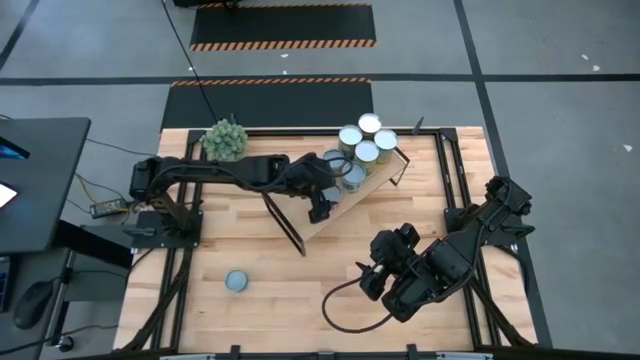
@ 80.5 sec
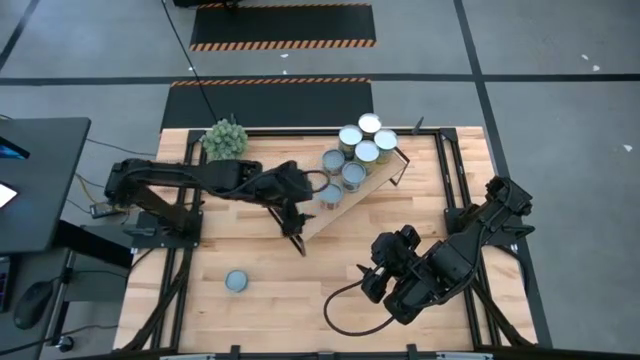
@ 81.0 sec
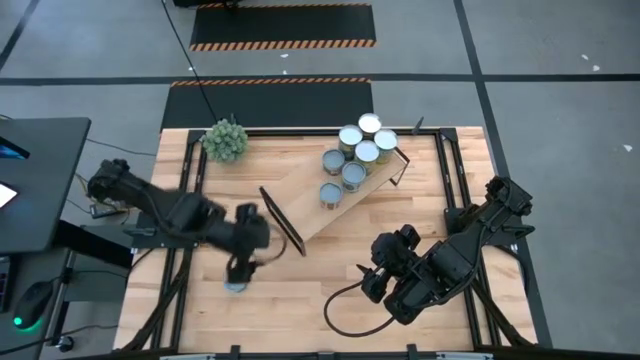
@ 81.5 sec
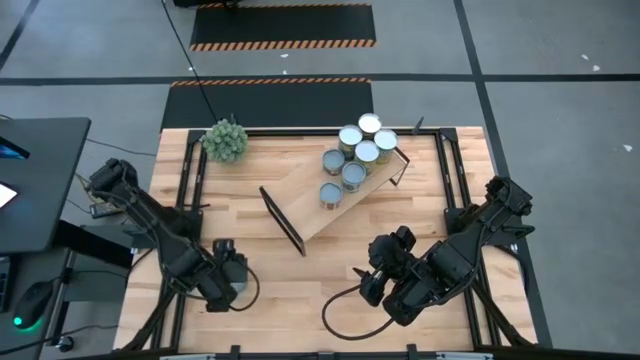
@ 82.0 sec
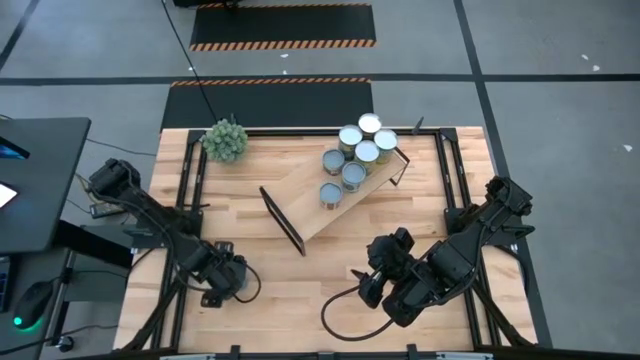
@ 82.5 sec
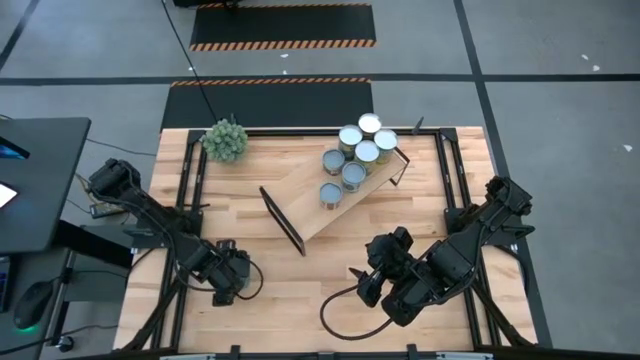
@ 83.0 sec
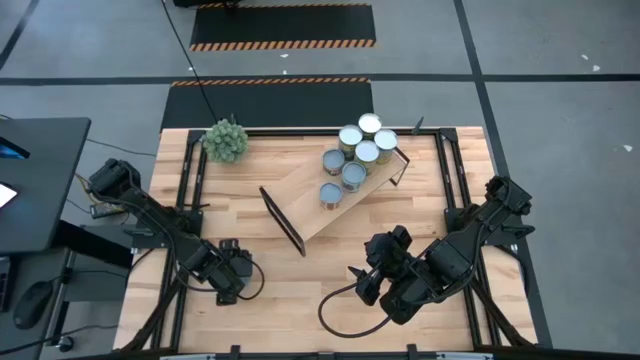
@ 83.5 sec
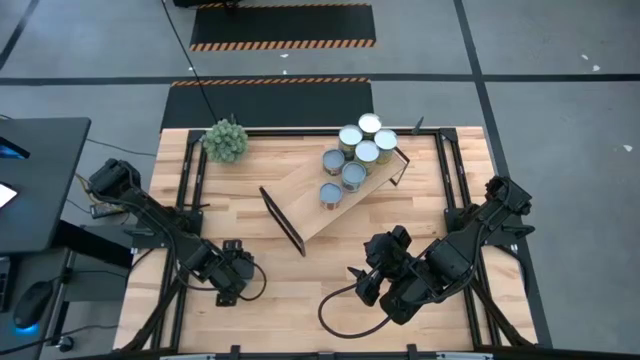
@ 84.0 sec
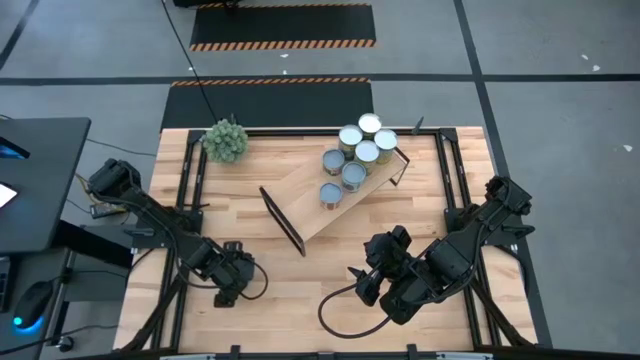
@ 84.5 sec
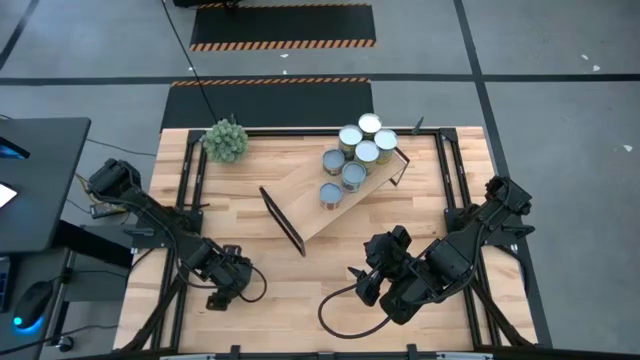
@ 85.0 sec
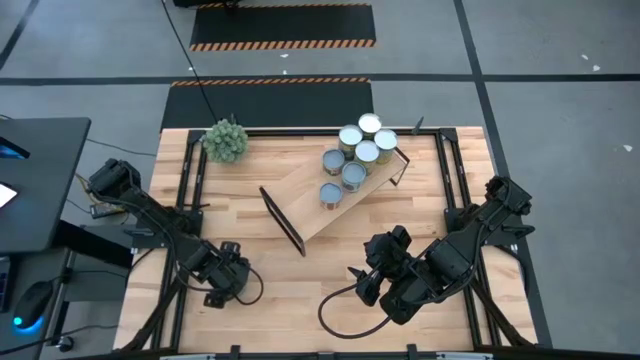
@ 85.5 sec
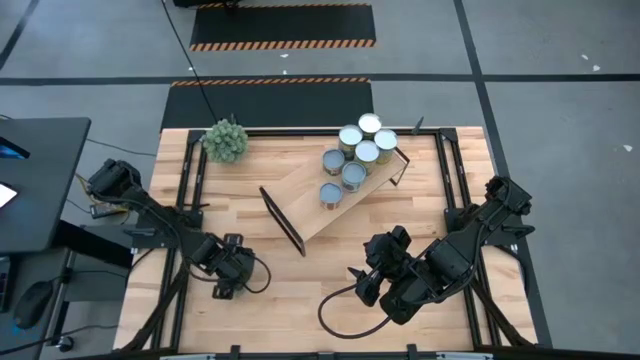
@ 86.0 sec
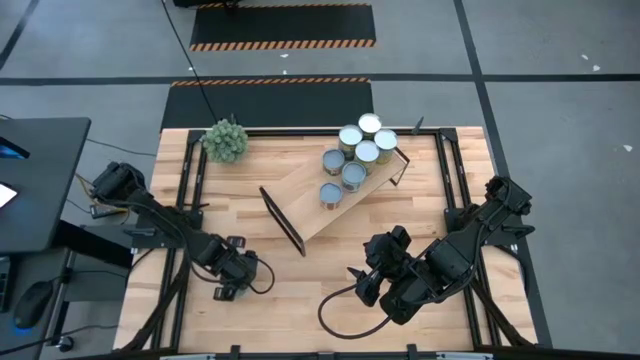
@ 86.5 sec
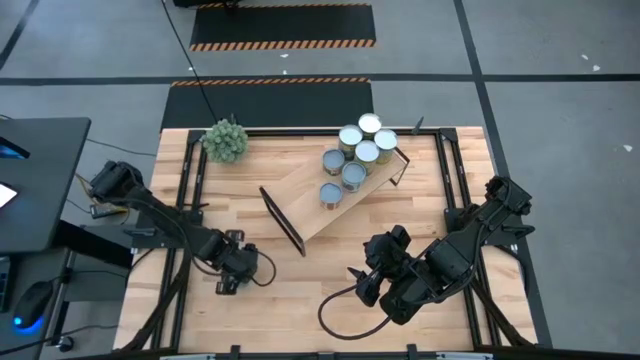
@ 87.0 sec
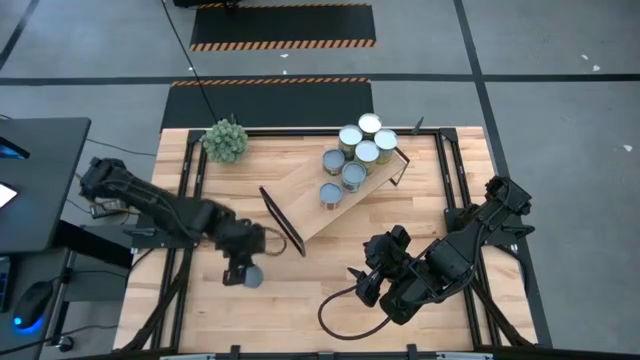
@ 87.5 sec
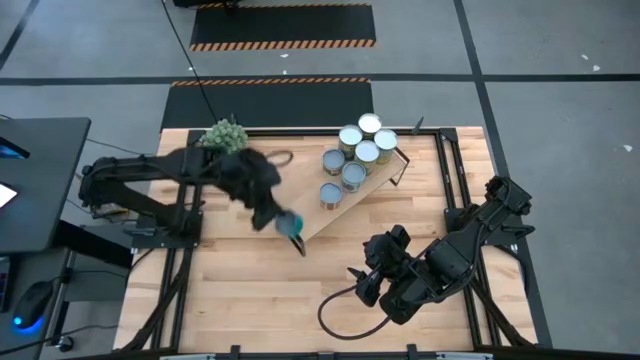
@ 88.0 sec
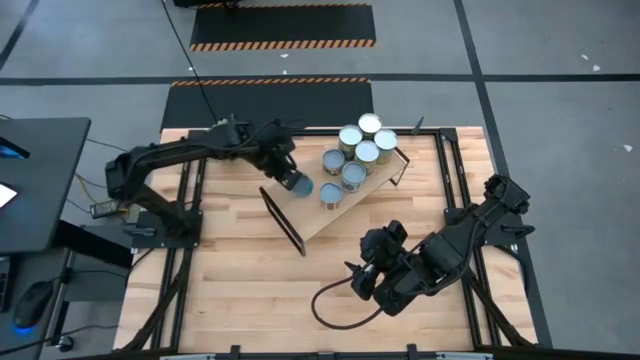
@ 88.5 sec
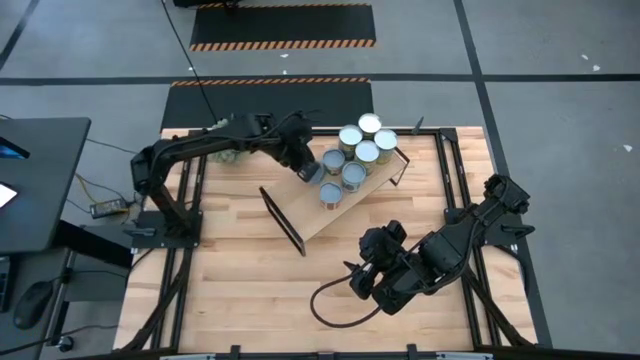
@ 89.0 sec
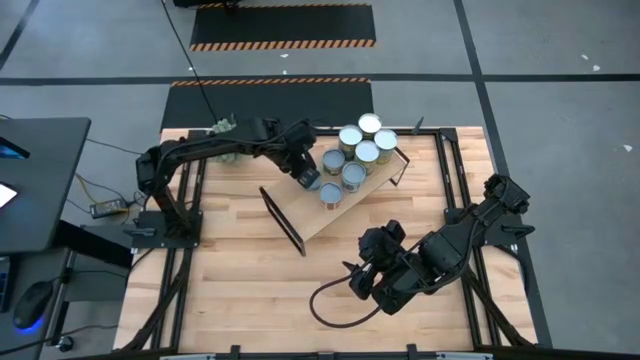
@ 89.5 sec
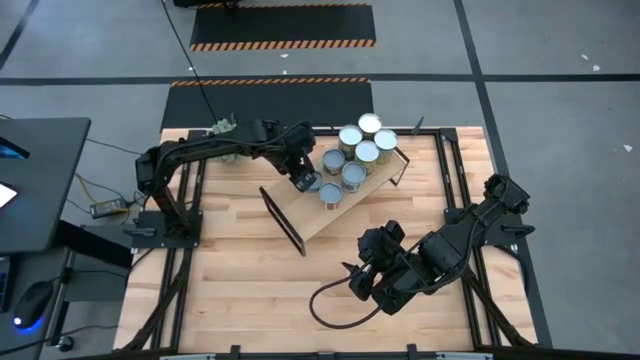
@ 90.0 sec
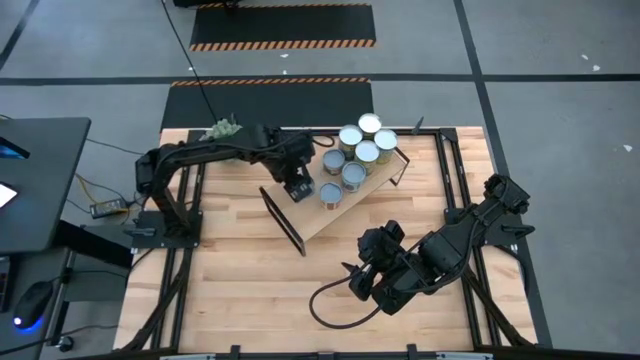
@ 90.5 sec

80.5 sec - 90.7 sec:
Task: Pick and place cans onto a shelf
Put the blue tuna can on the shelf

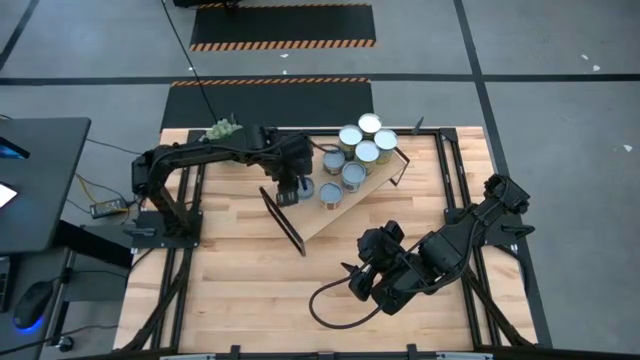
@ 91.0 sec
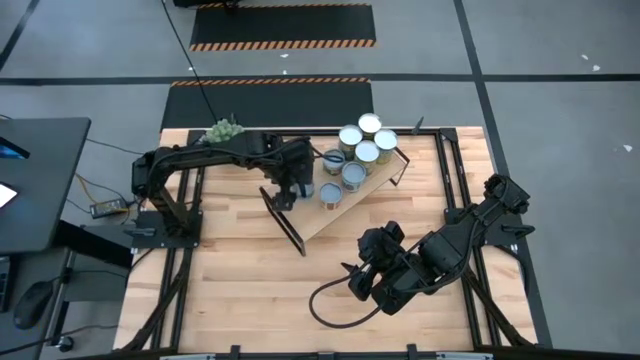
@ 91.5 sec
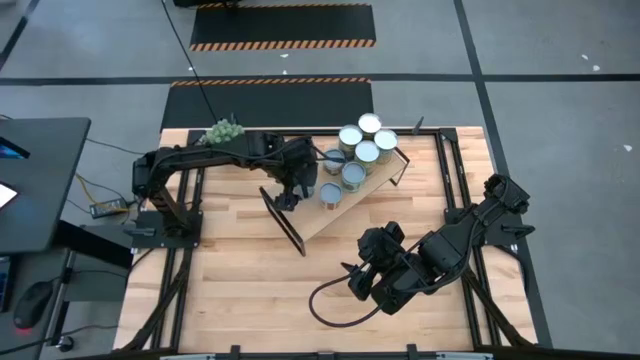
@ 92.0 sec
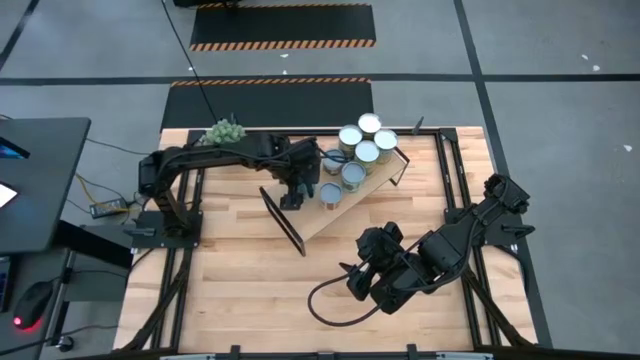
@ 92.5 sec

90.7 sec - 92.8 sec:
Put the blue tuna can on the shelf

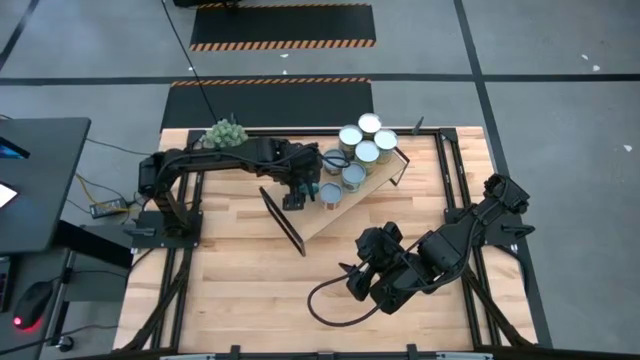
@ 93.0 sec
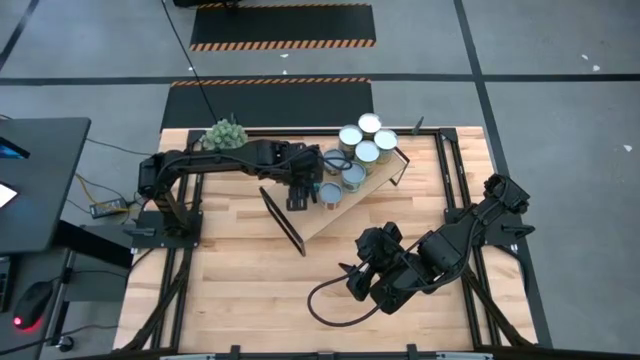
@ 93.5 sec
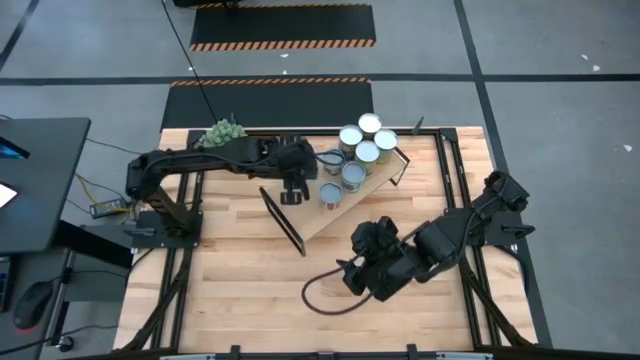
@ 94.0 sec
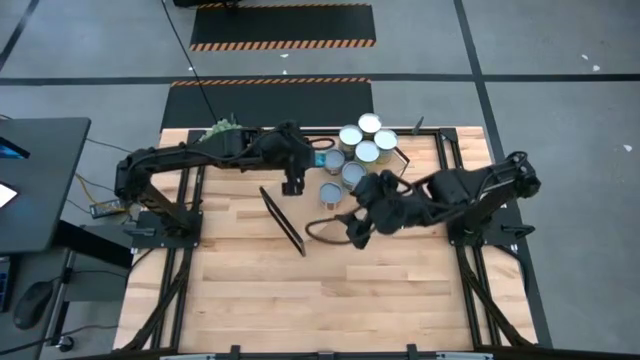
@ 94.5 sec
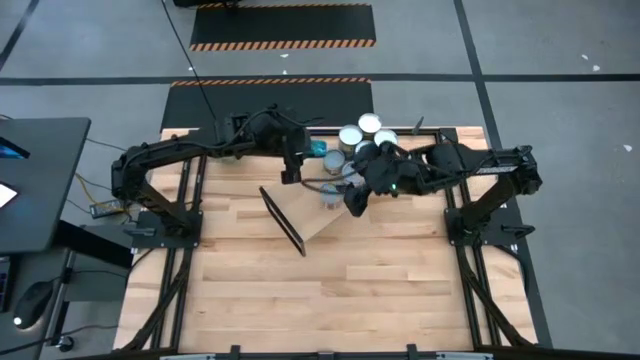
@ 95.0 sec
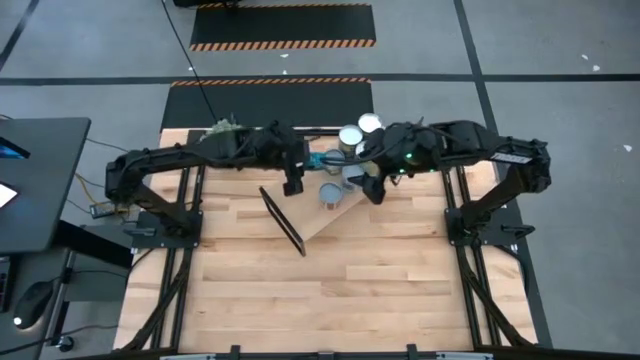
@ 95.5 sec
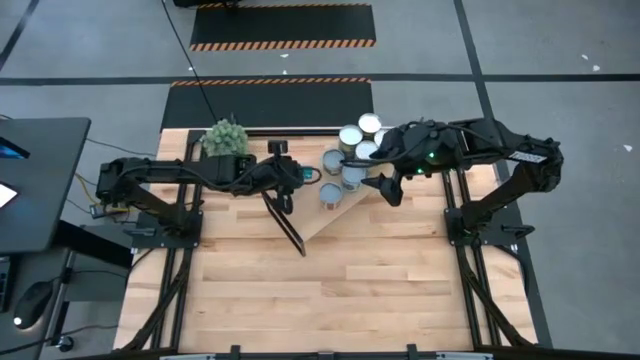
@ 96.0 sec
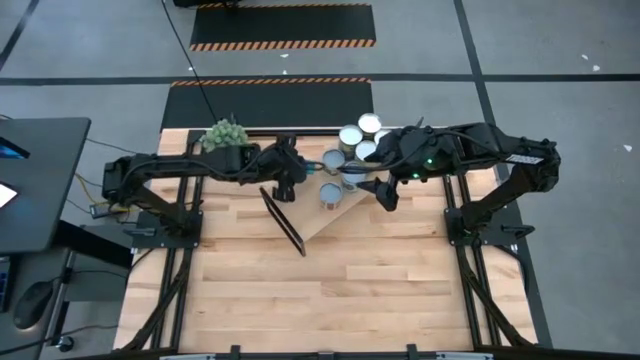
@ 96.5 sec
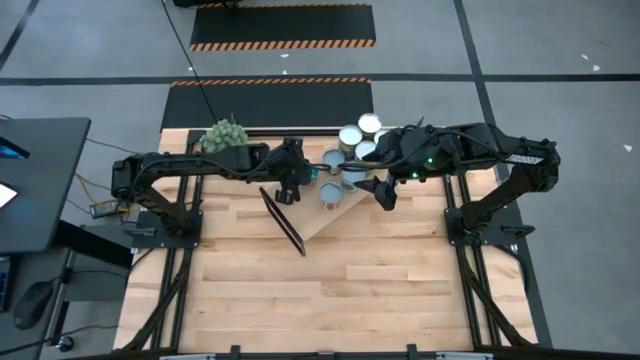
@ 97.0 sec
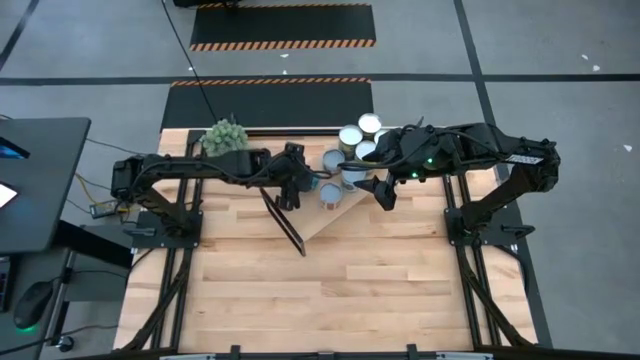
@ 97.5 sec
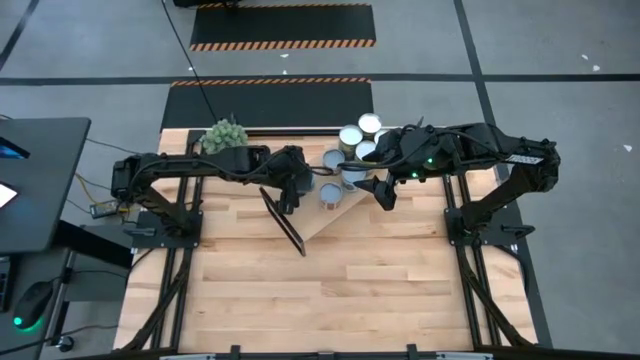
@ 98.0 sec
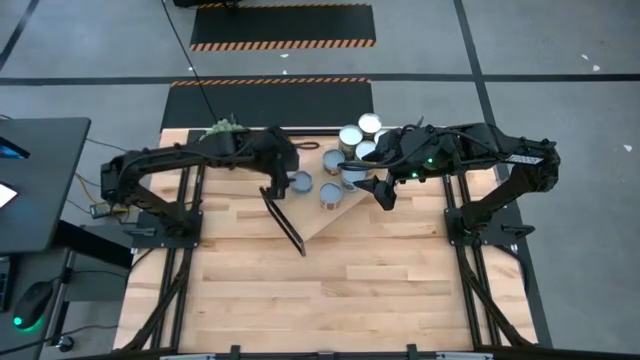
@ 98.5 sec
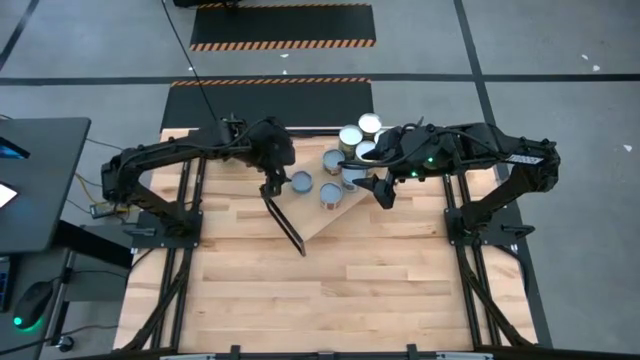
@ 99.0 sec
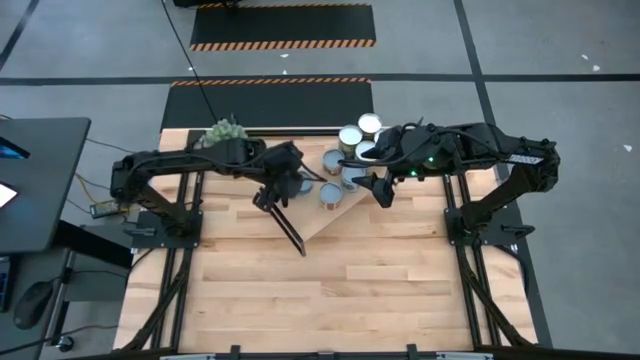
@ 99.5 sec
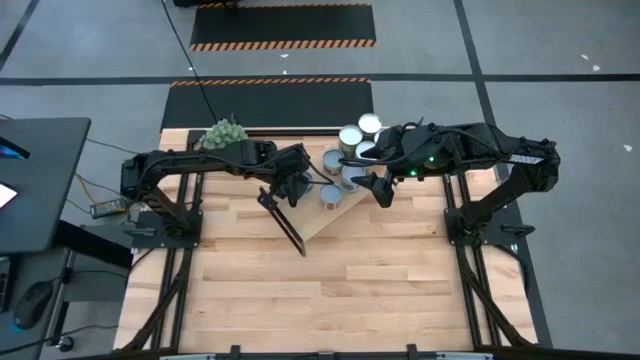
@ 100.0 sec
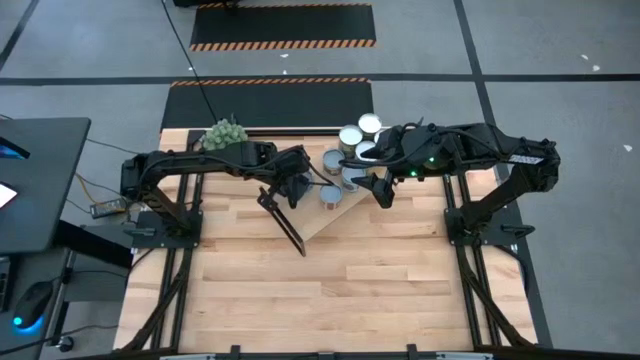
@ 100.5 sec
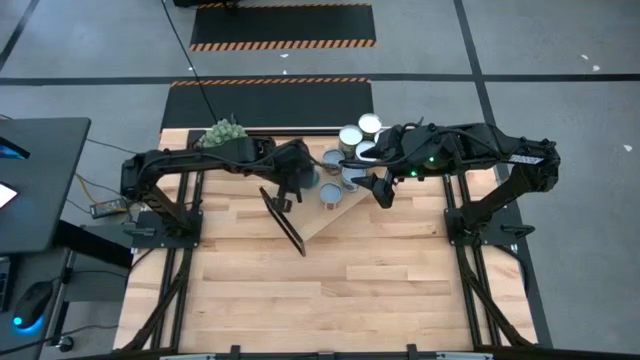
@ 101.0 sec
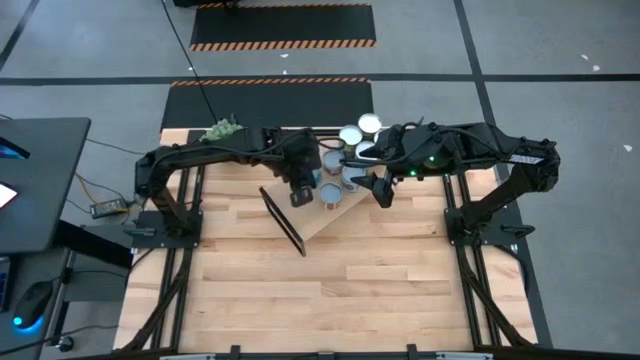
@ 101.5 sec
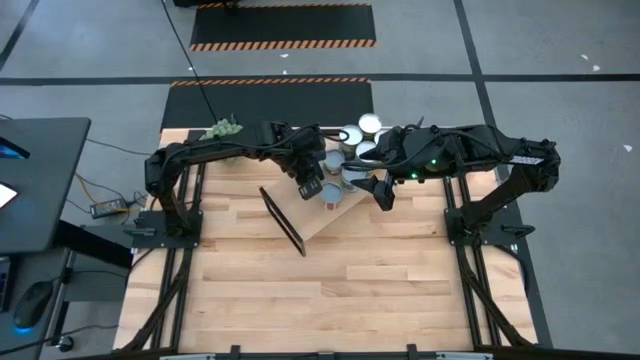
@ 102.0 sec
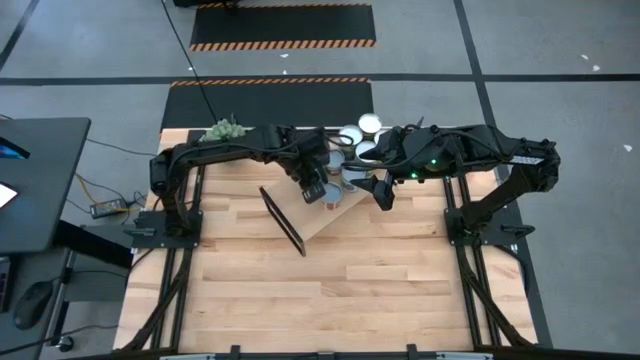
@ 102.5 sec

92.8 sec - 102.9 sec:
Put the blue tuna can on the shelf
